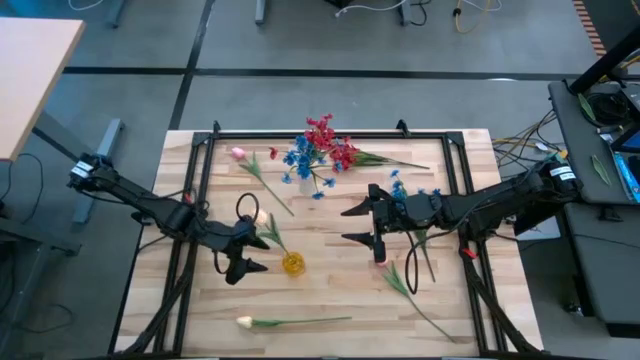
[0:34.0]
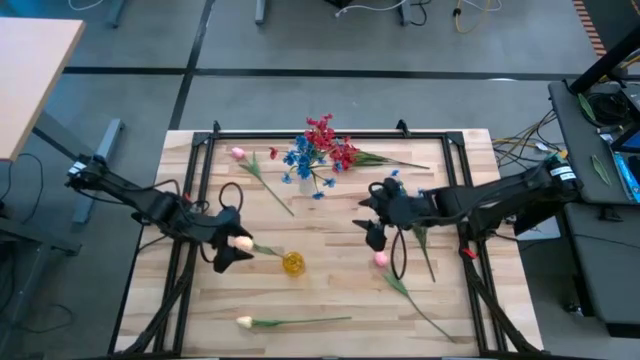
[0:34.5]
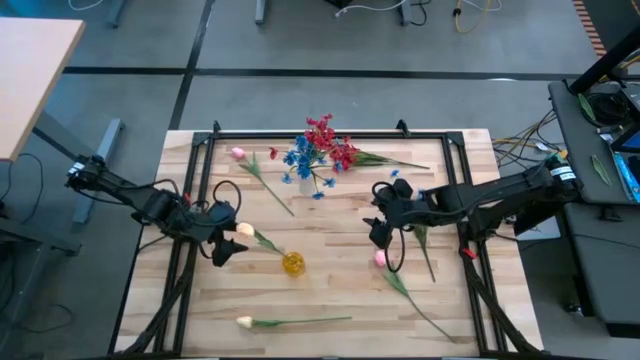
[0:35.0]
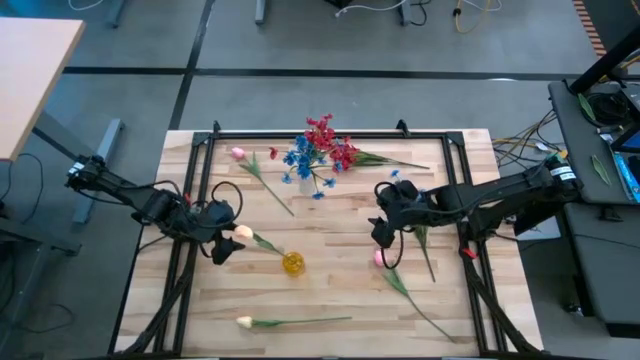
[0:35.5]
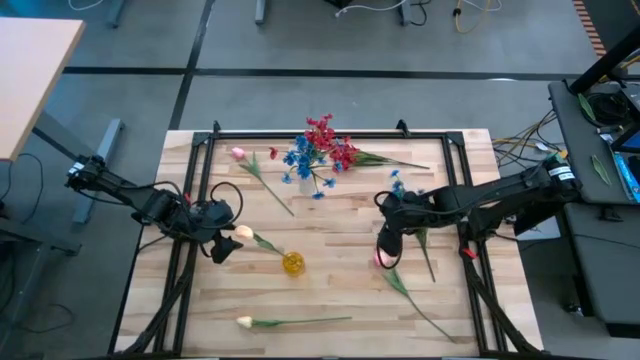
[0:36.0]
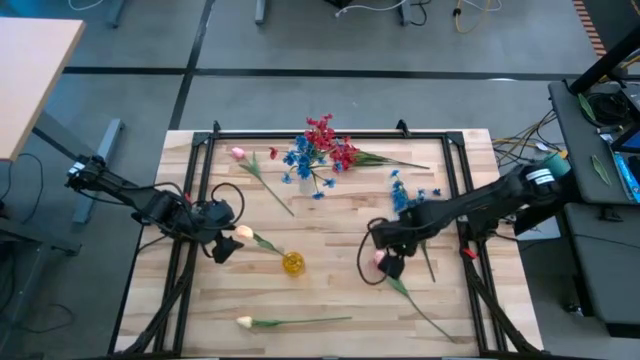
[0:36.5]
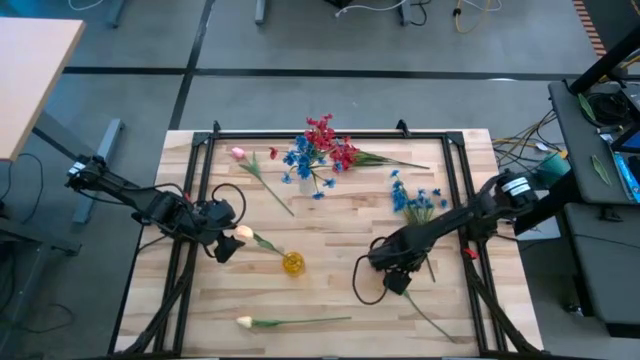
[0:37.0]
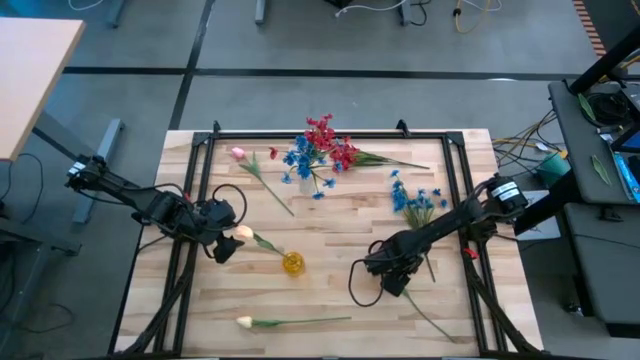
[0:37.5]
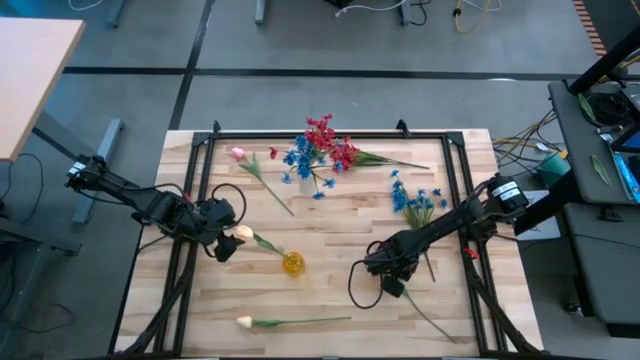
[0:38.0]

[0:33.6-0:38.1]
Task: Sort flowers into vase by color
Put the bottom pink tulip into the yellow vase

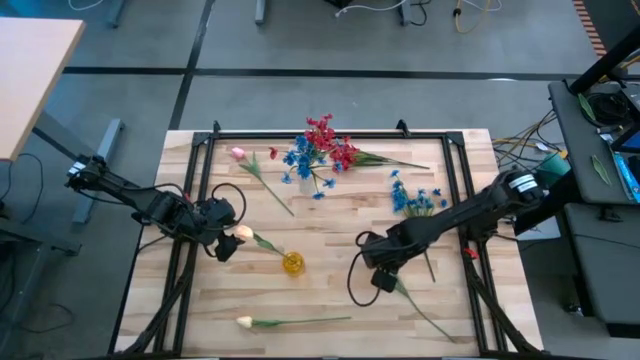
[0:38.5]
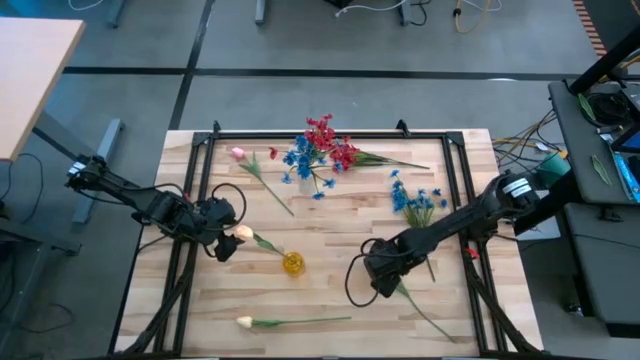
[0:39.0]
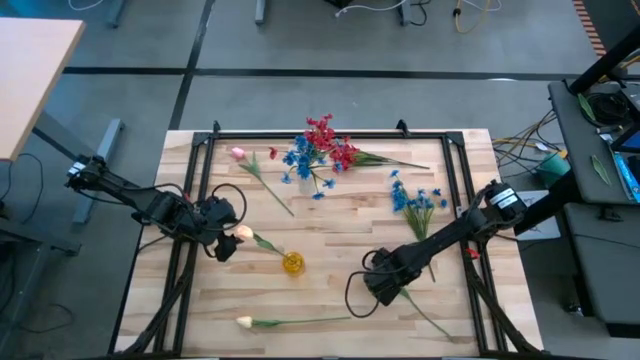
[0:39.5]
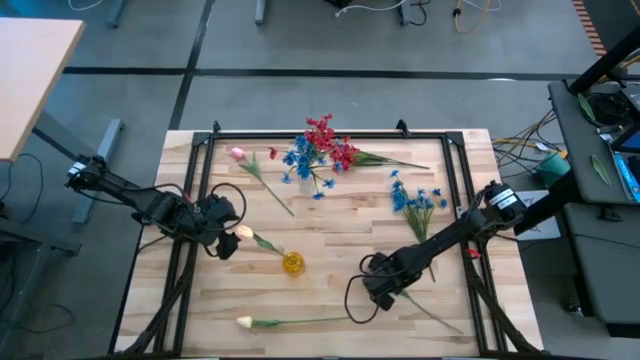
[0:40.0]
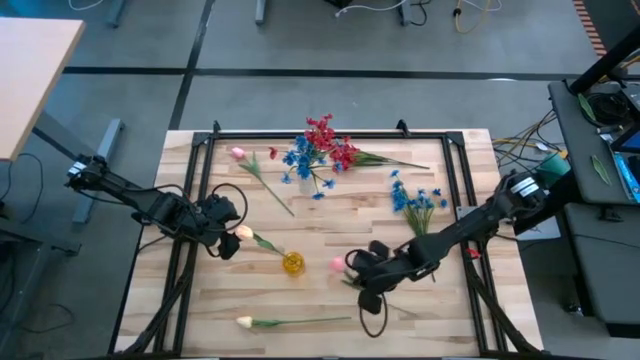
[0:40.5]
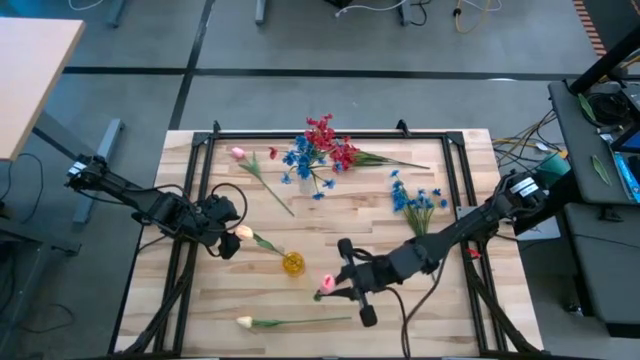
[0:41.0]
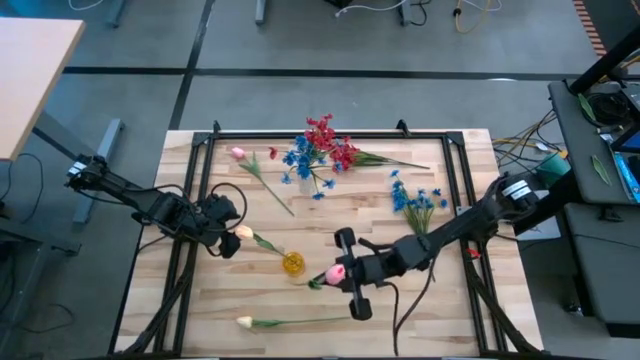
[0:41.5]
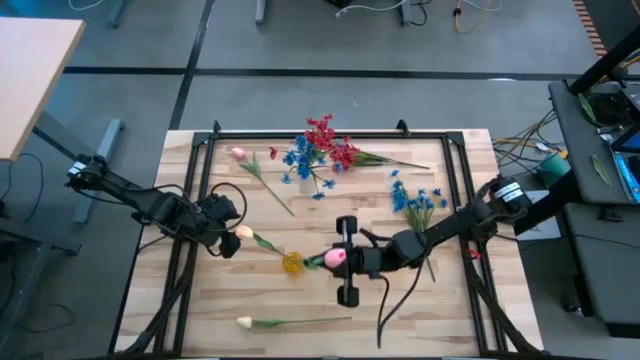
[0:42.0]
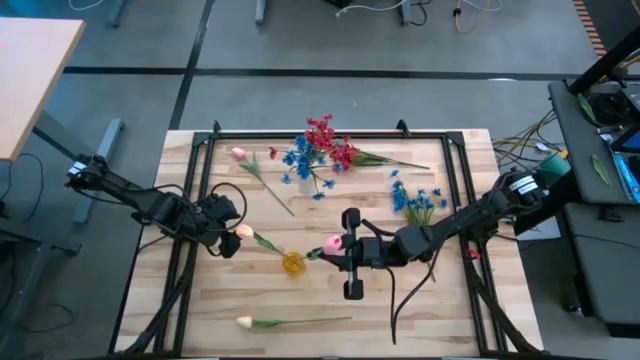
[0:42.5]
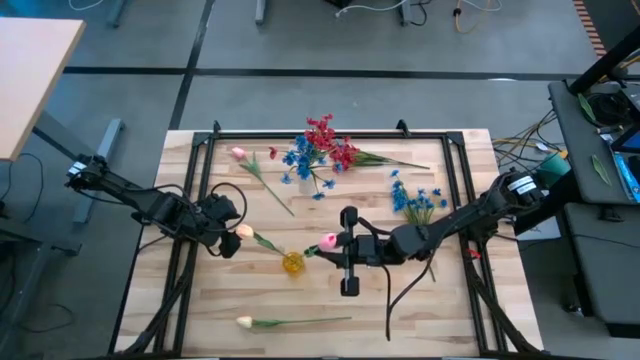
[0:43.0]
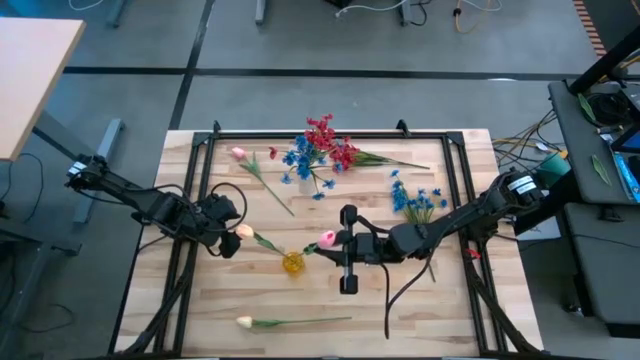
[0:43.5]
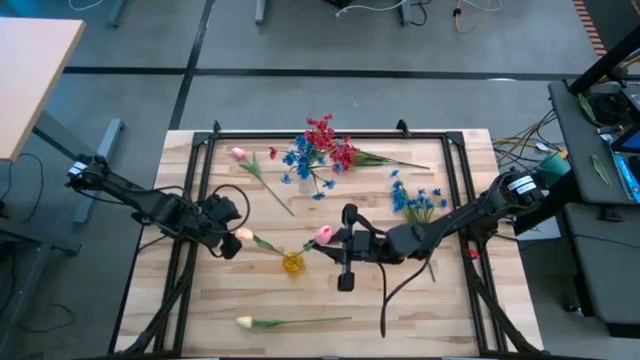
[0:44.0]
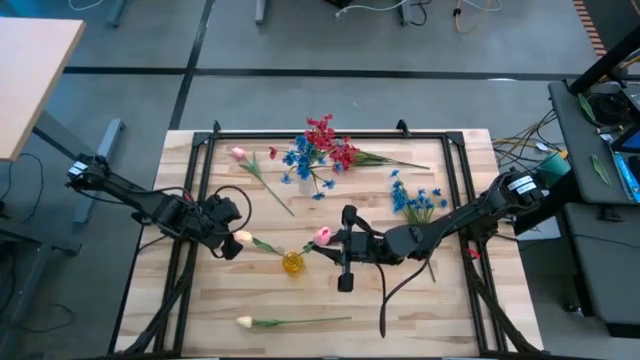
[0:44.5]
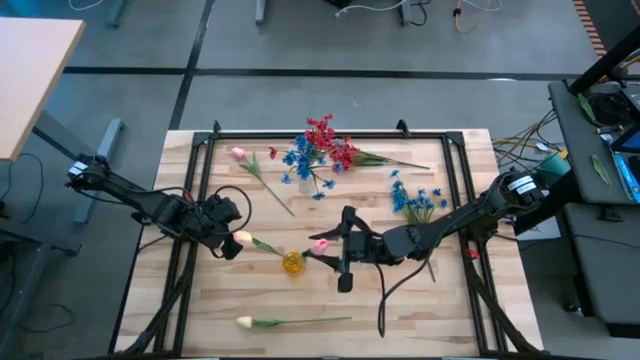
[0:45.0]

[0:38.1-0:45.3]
Put the bottom pink tulip into the yellow vase

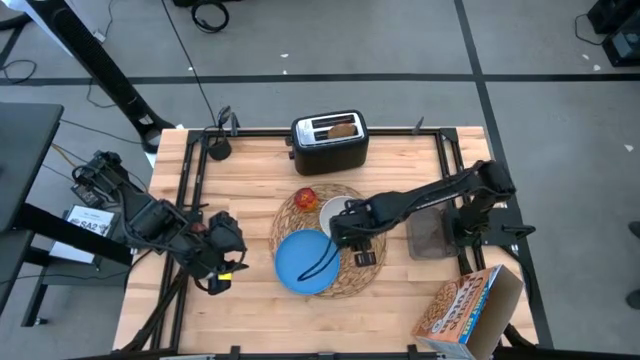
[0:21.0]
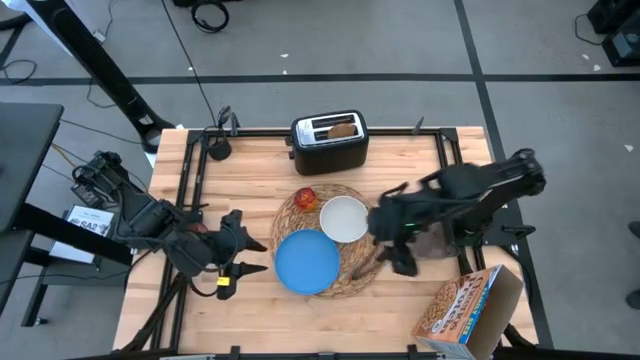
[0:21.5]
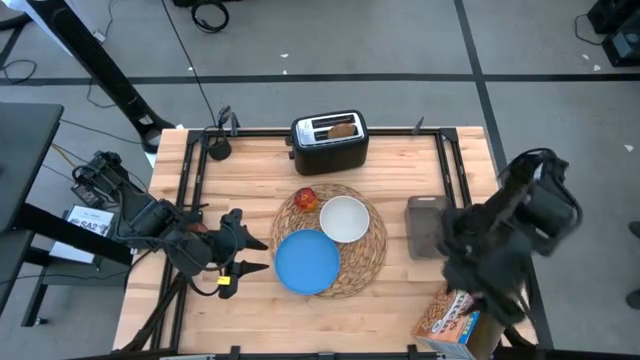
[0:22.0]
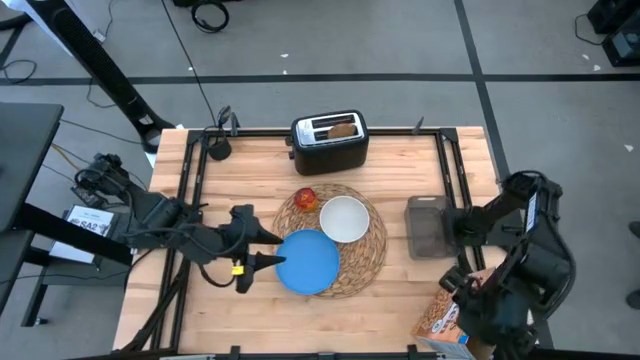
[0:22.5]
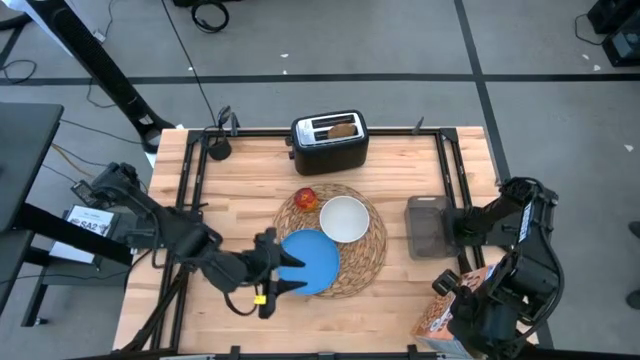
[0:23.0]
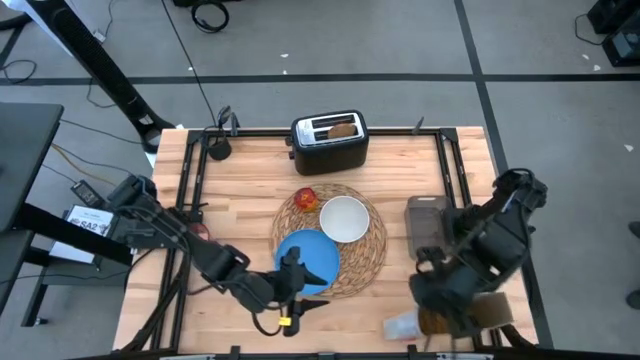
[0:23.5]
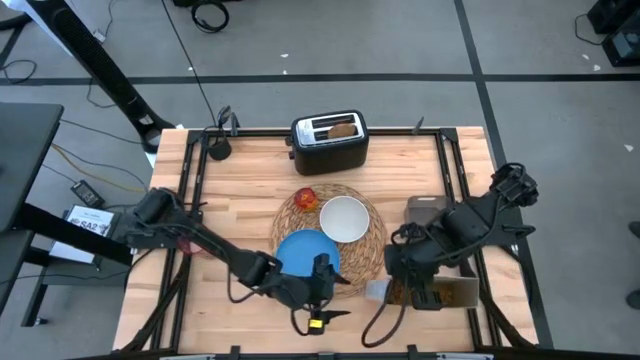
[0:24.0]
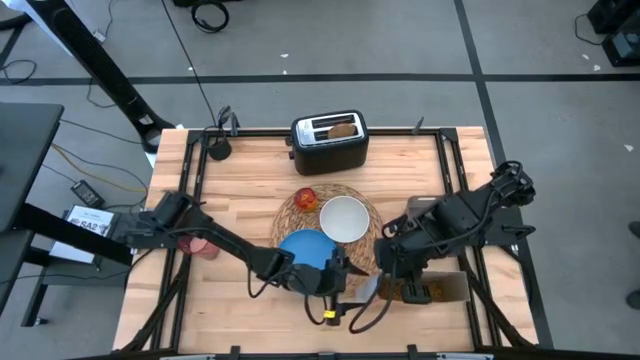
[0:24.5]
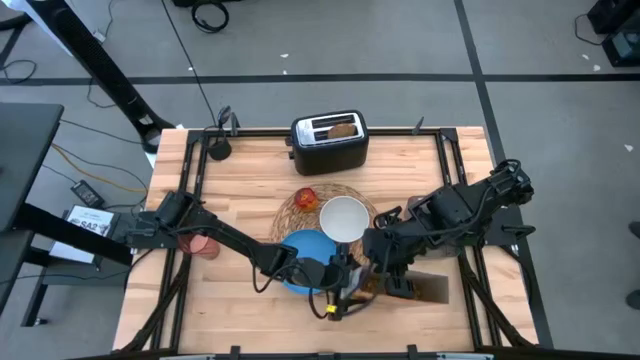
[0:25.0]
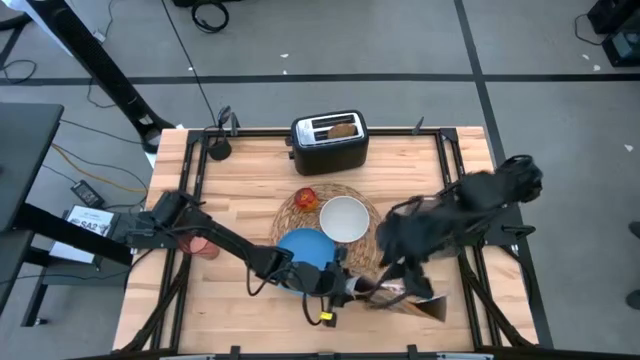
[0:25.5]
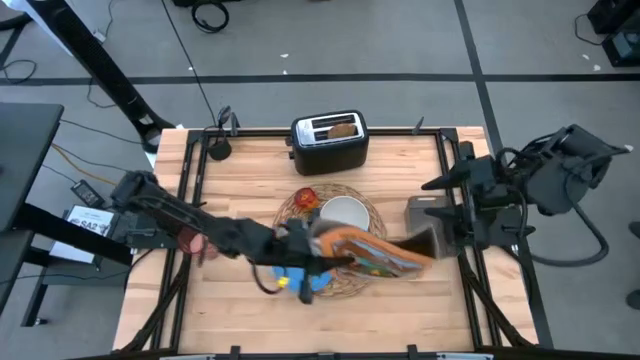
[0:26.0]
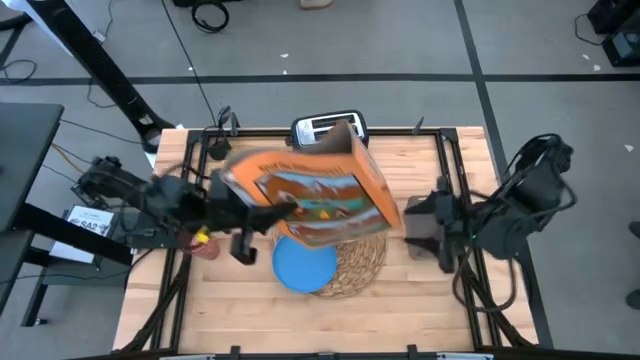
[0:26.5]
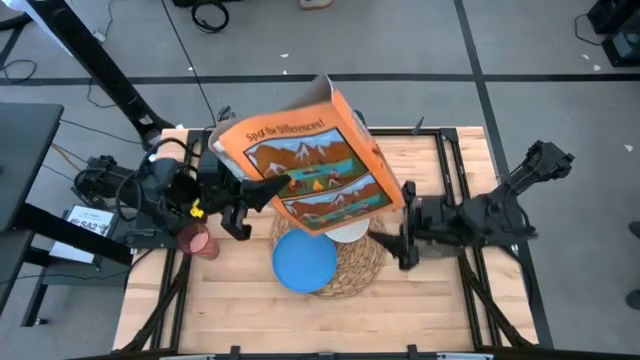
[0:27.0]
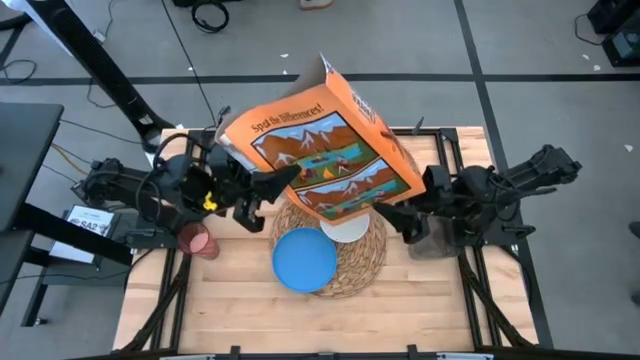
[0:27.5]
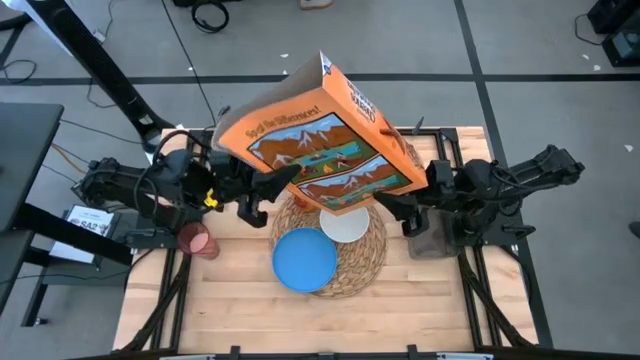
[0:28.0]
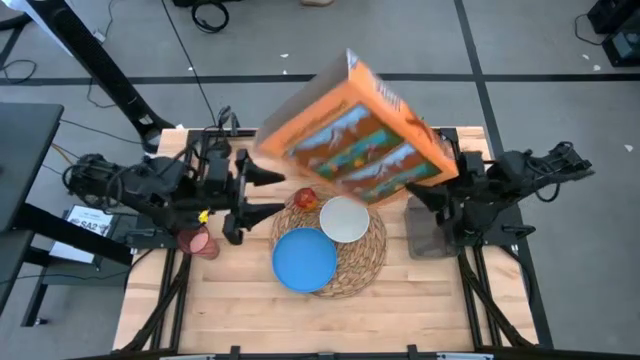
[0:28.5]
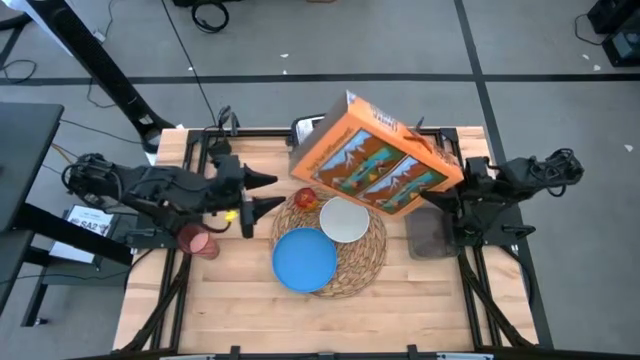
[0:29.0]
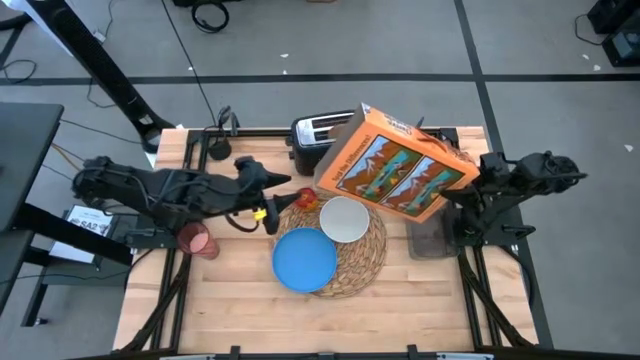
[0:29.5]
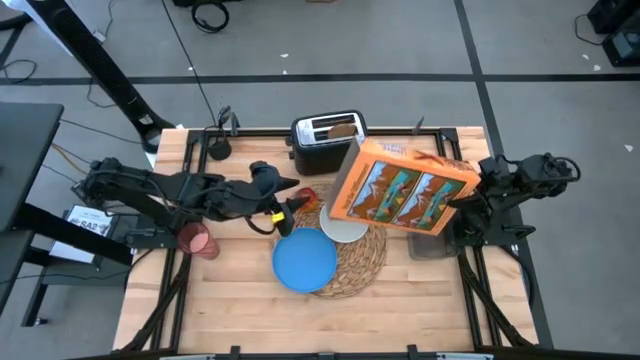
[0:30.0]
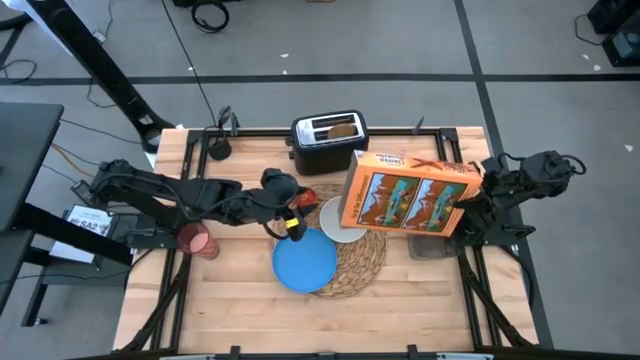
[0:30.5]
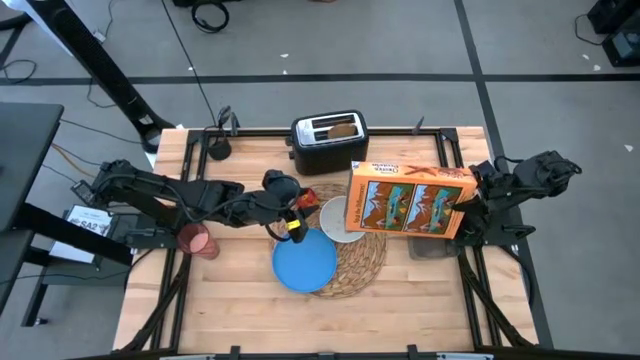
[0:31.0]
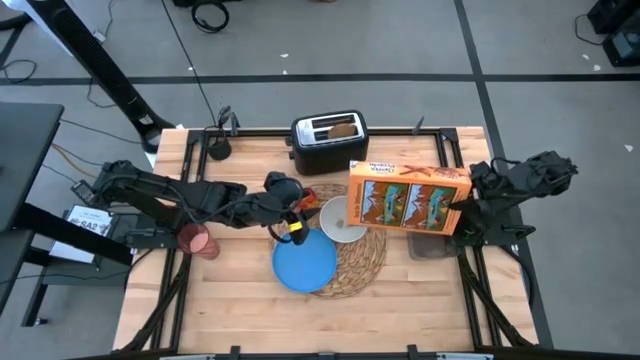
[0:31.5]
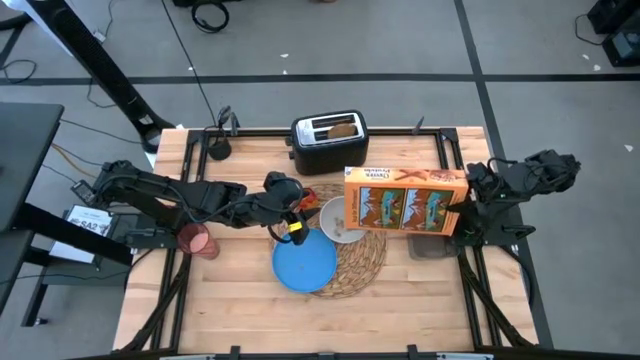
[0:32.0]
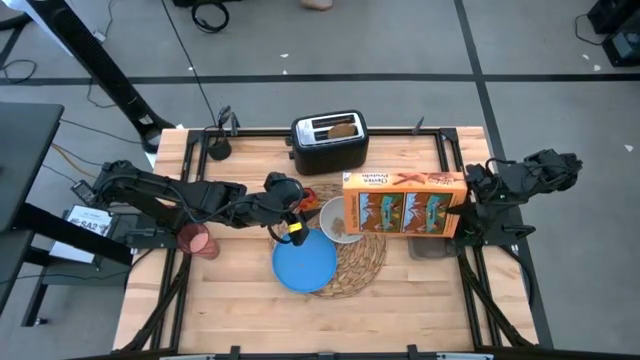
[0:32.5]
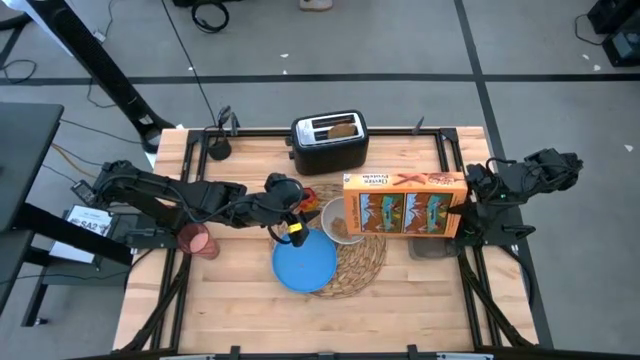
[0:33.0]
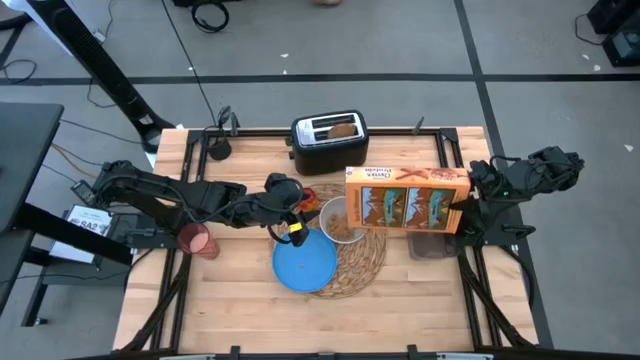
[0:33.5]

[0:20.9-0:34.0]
Task: Arrange a breakfast setting
Pour the cereal into the white bowl
